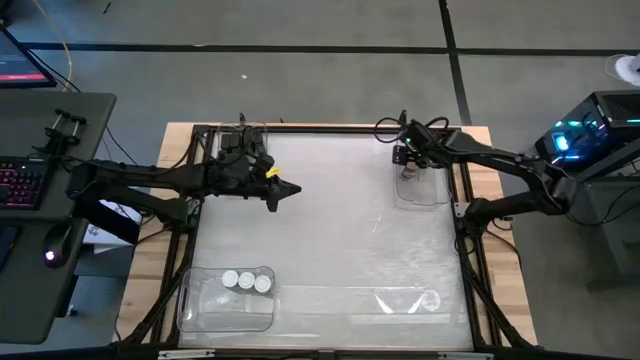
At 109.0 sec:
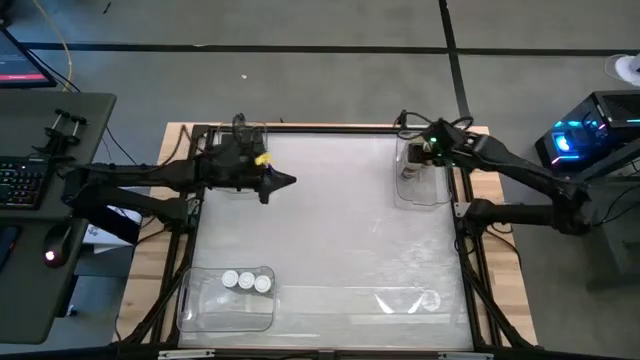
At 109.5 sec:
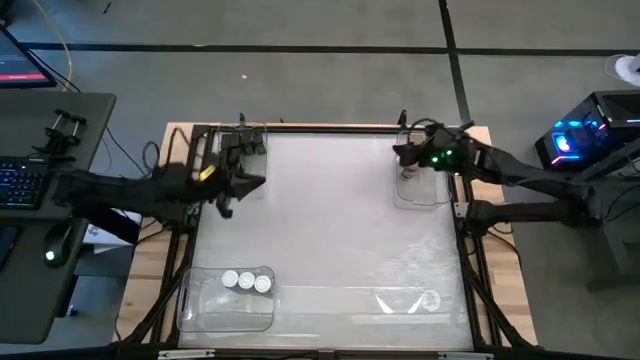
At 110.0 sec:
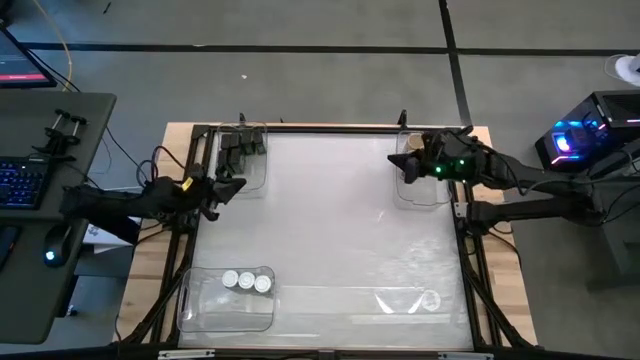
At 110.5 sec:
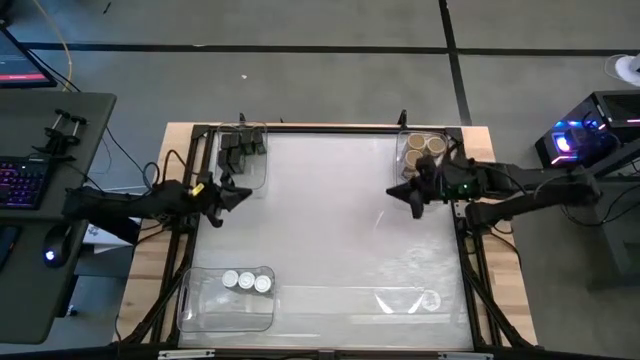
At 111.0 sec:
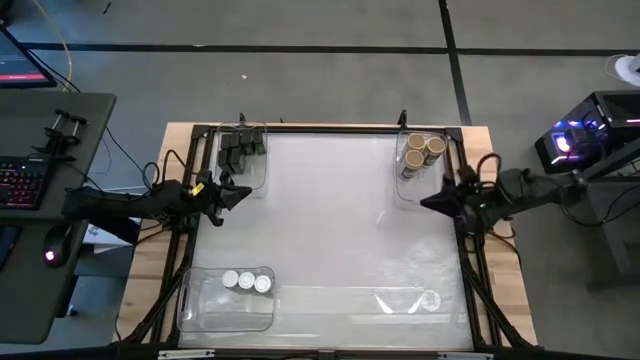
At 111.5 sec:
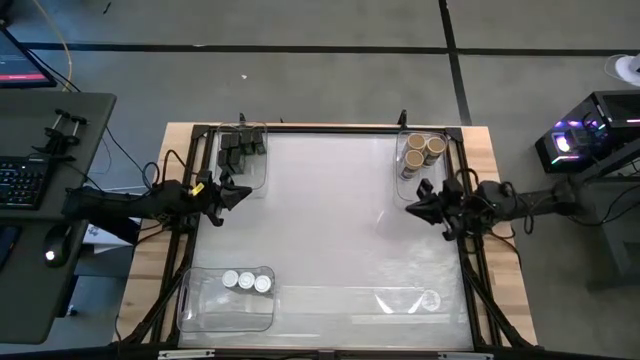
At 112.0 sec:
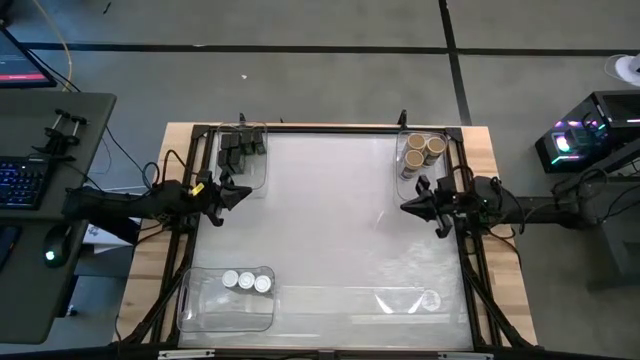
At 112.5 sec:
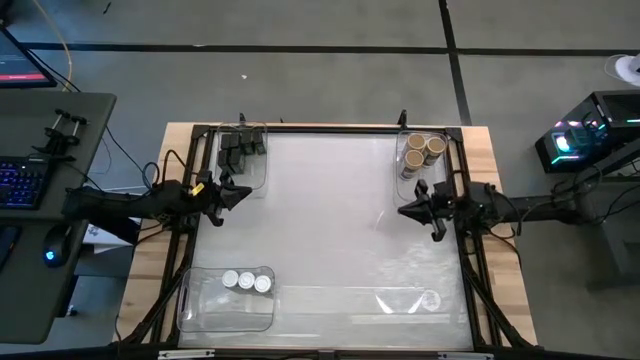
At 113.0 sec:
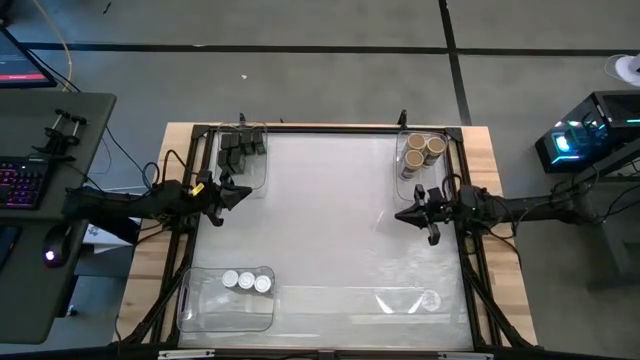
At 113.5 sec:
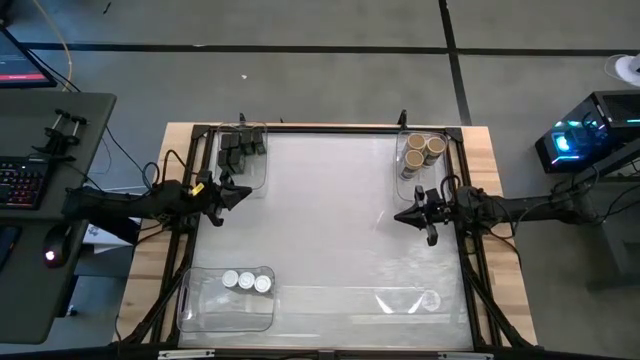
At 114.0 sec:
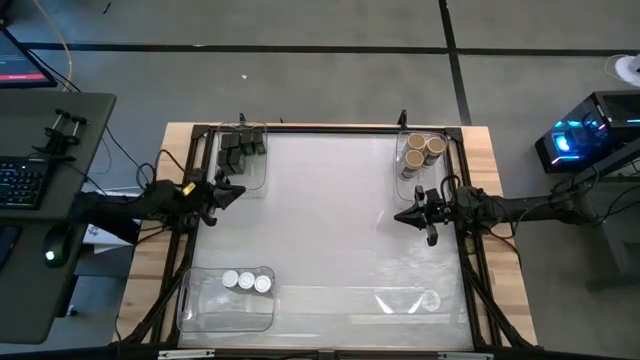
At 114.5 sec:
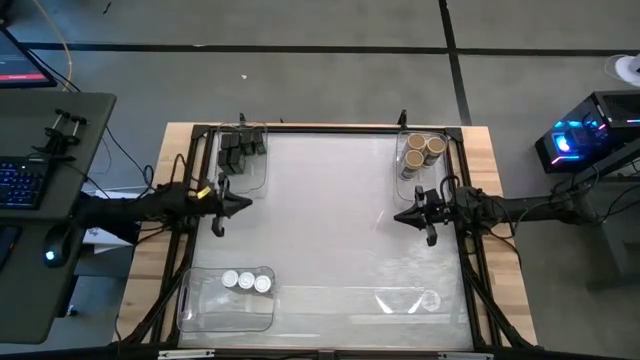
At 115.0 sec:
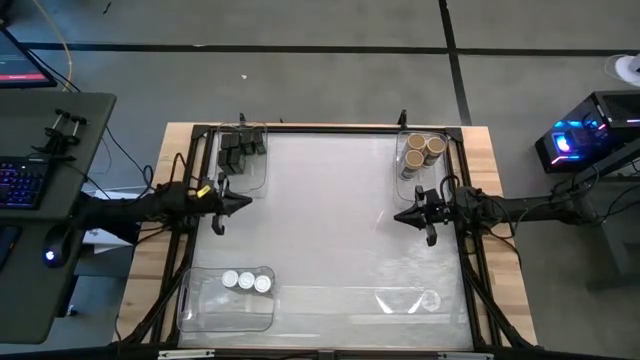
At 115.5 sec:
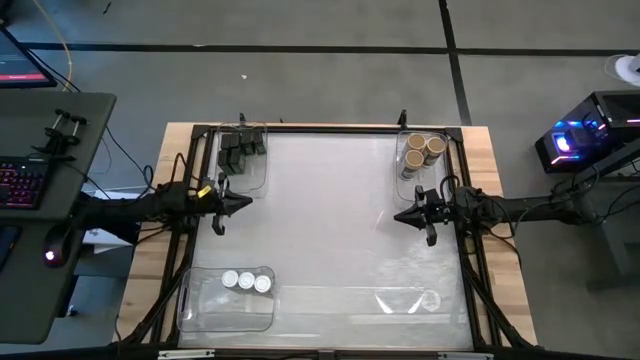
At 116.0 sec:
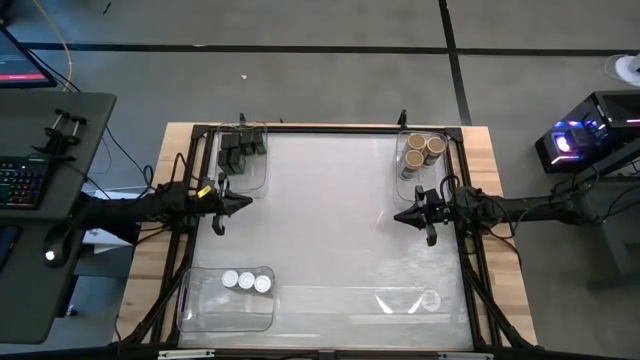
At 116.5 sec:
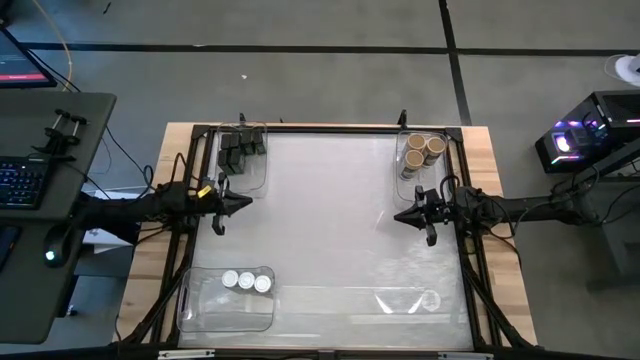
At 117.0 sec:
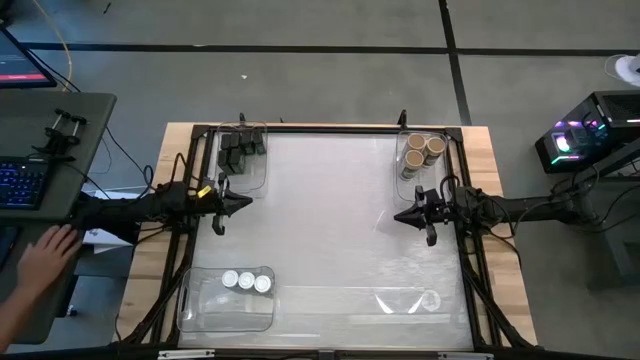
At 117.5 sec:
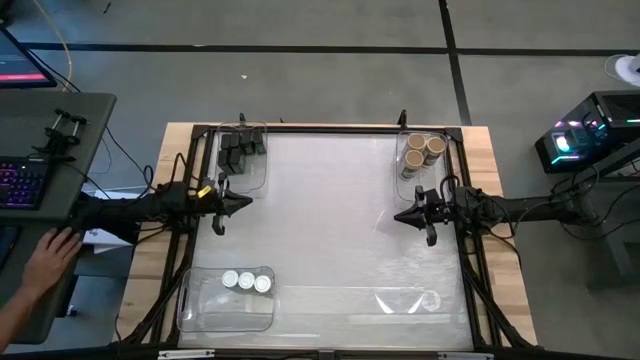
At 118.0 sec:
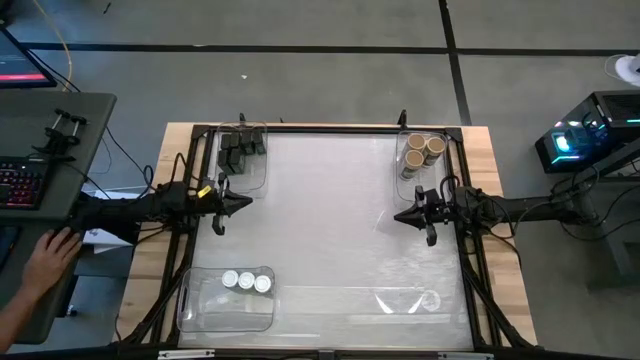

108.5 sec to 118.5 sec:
Task: Sort spices by type
Return to Home Position

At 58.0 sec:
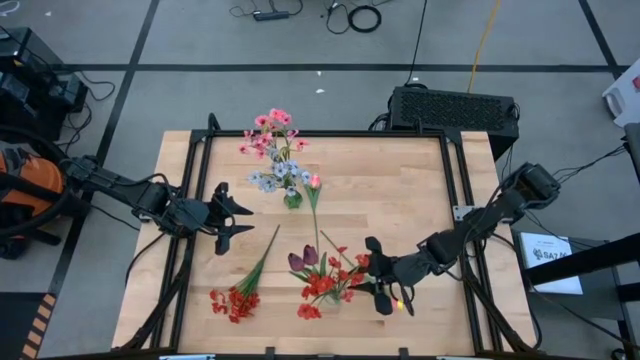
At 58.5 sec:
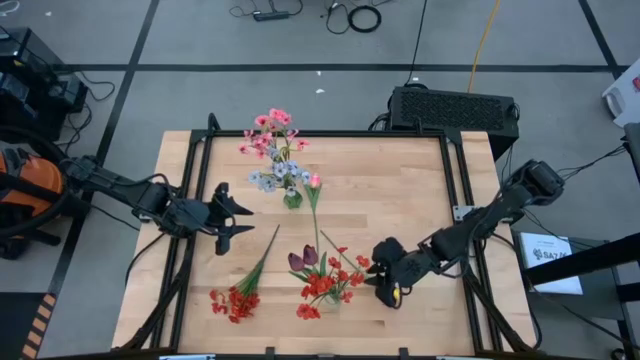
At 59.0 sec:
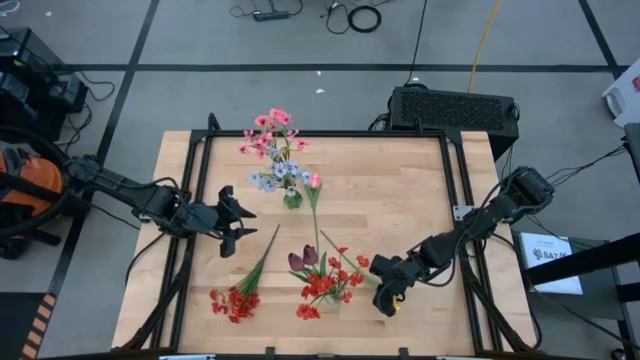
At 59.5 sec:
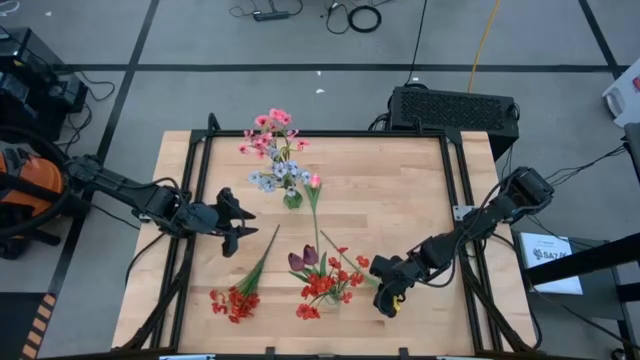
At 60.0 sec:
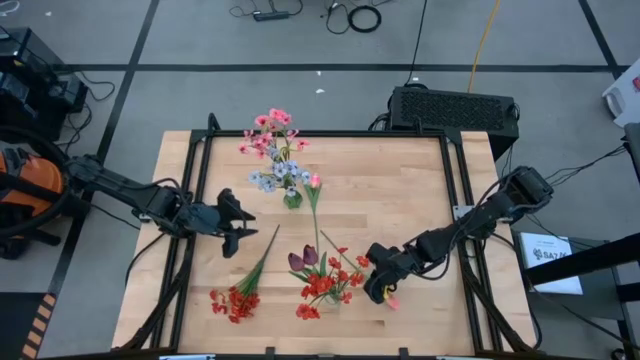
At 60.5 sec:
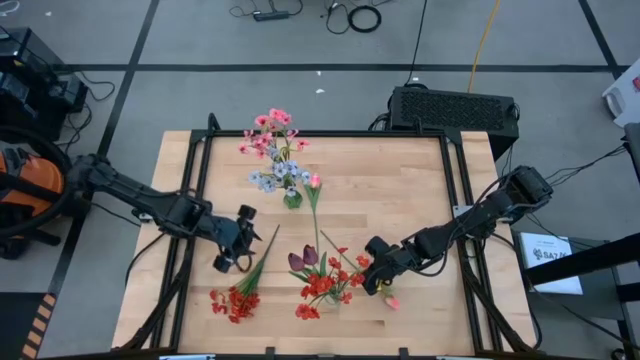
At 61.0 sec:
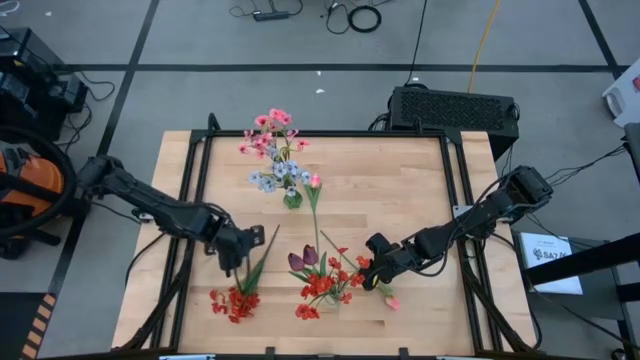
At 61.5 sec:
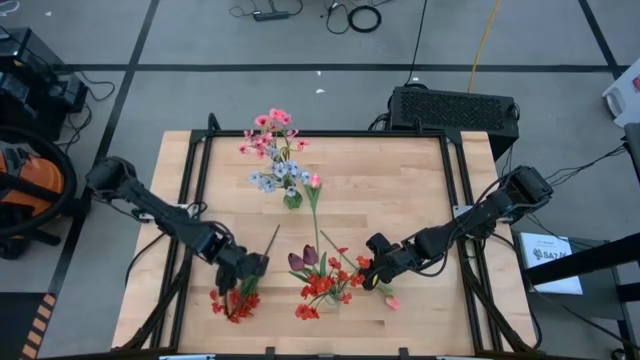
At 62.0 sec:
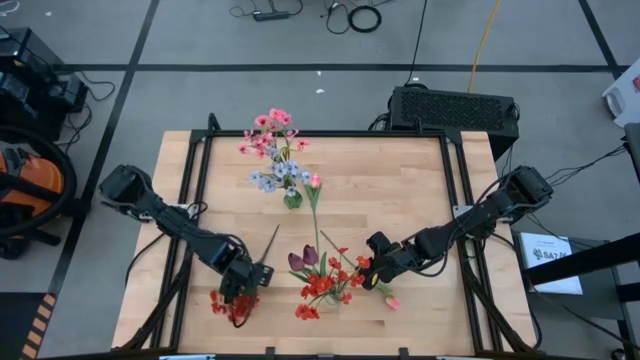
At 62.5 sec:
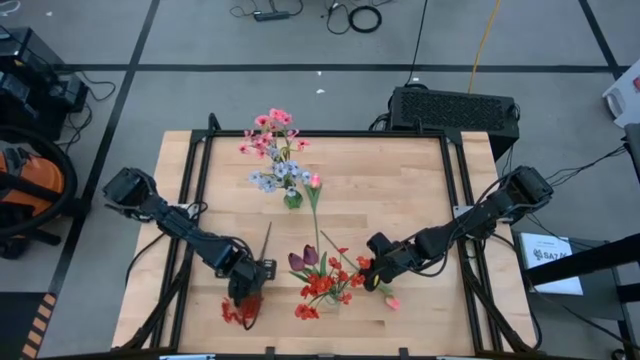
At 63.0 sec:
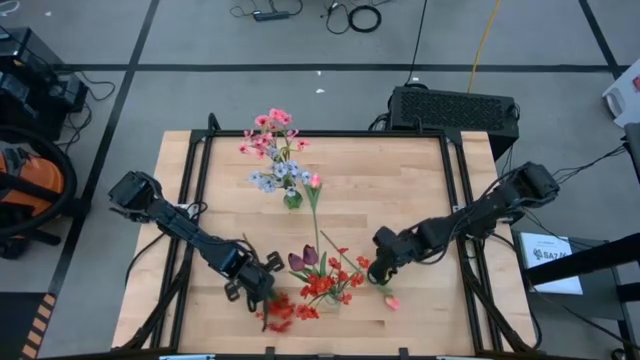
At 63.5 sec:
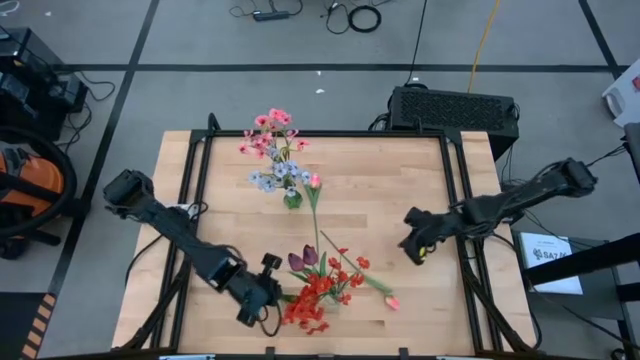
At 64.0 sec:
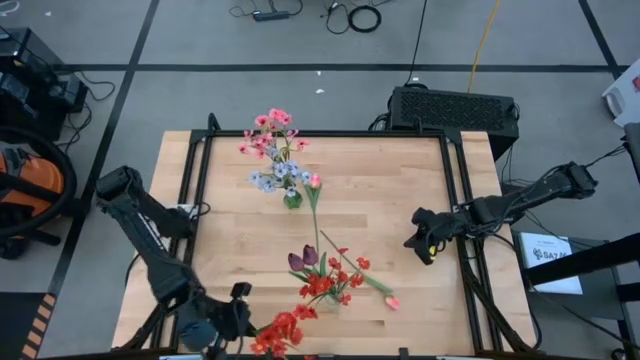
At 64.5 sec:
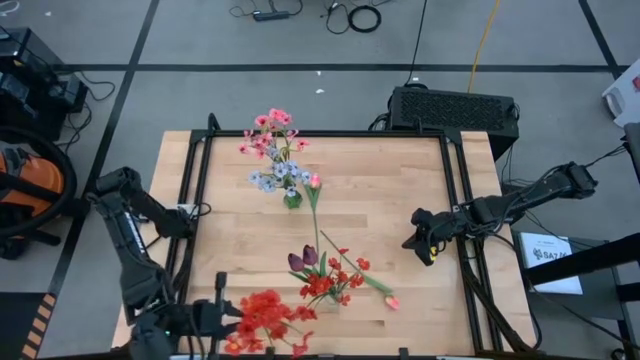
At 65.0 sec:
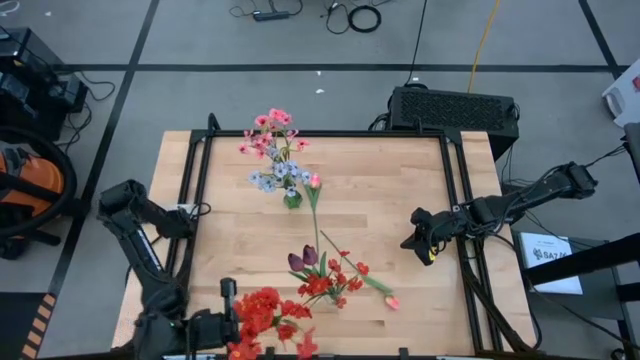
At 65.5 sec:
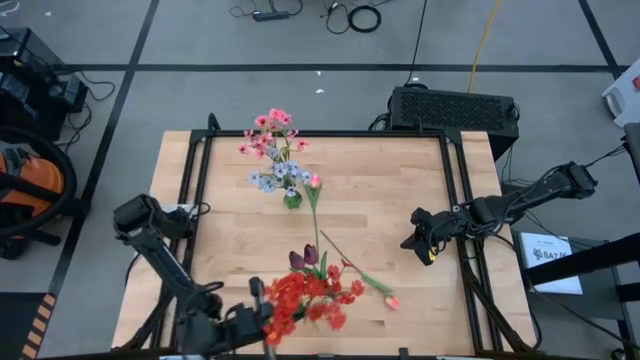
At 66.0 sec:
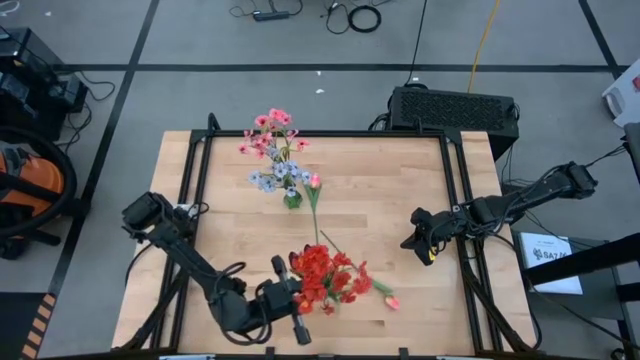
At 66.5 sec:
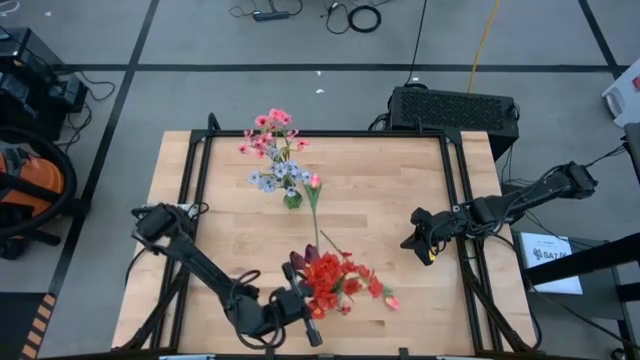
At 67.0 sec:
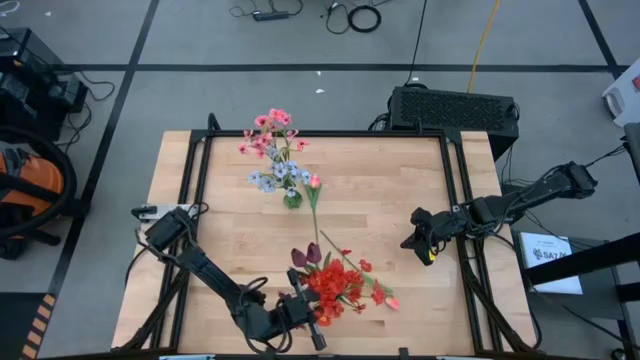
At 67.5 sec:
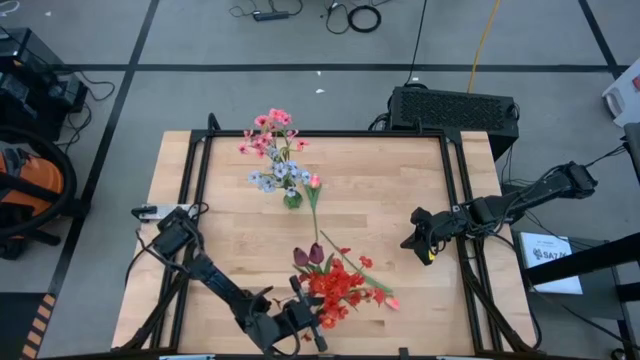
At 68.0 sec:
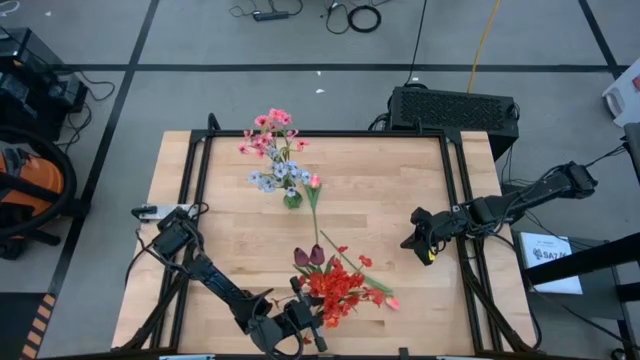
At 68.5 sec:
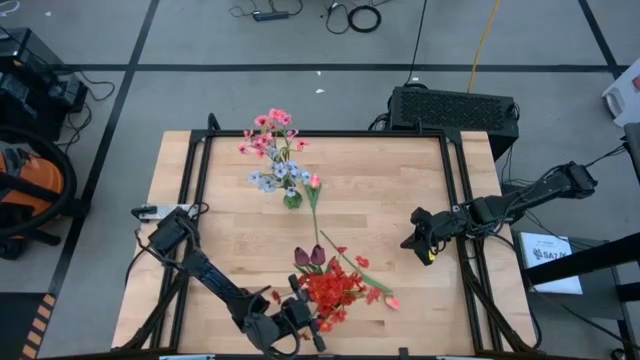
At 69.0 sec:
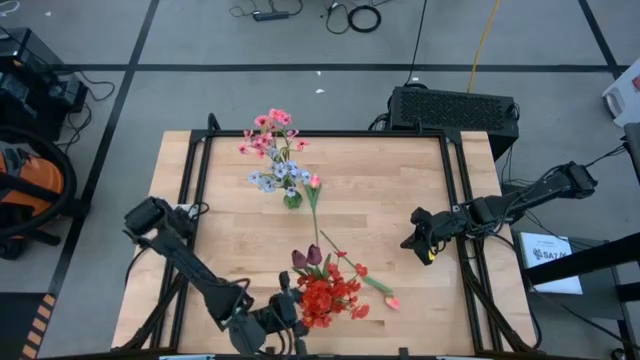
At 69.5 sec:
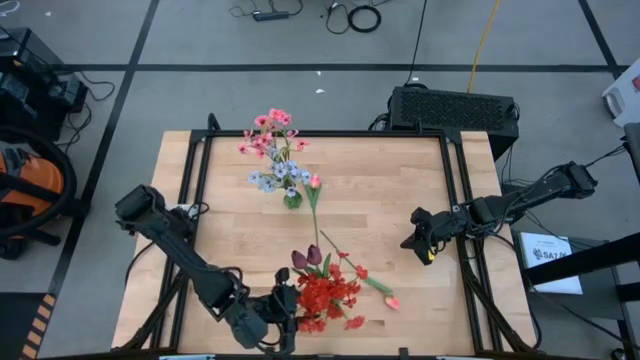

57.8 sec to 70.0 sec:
Task: Sort flowers into vase by color
Put the red flowers into the transparent vase
